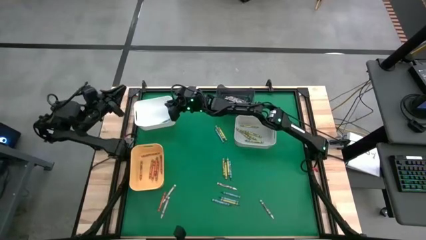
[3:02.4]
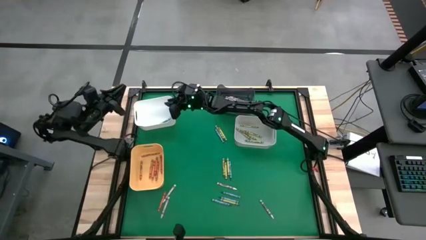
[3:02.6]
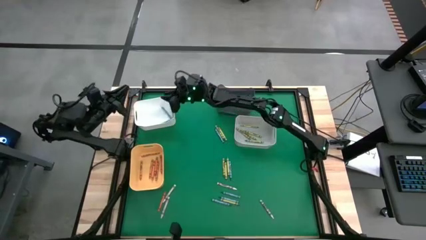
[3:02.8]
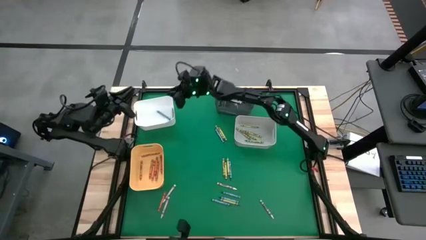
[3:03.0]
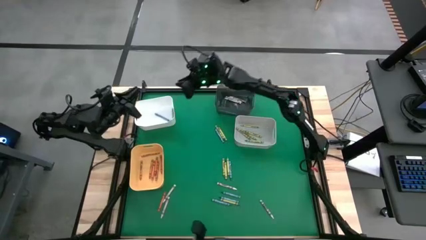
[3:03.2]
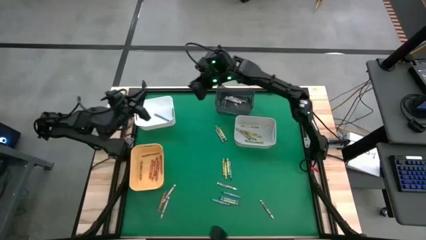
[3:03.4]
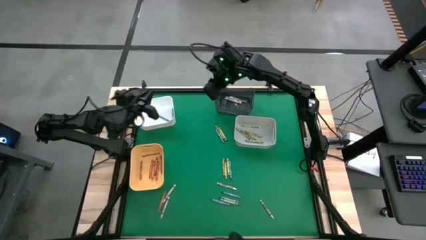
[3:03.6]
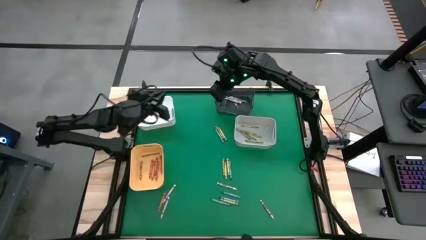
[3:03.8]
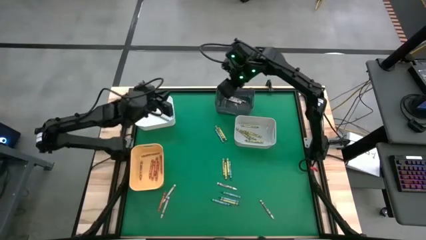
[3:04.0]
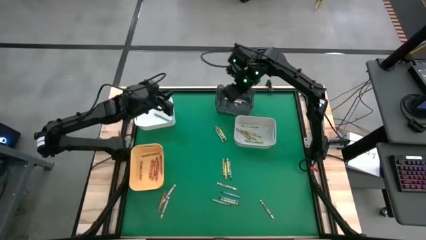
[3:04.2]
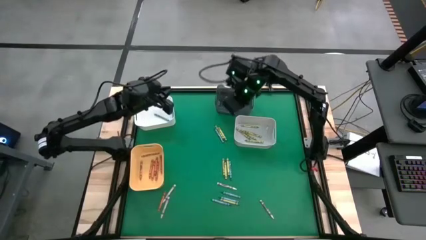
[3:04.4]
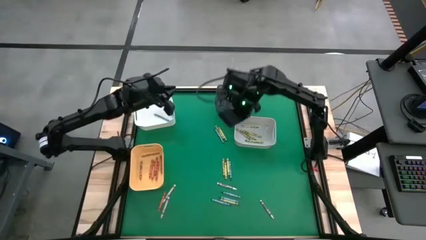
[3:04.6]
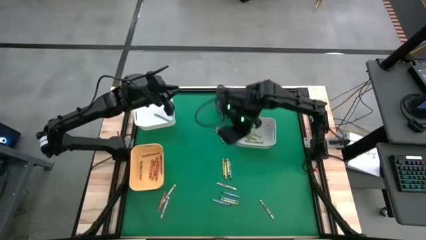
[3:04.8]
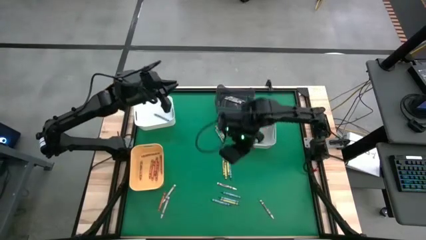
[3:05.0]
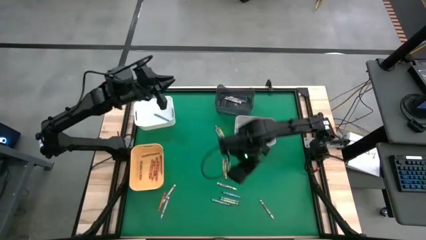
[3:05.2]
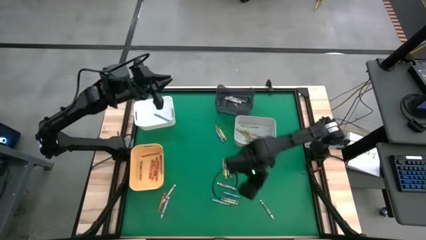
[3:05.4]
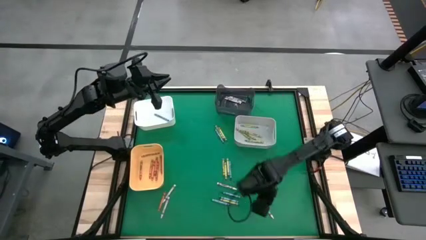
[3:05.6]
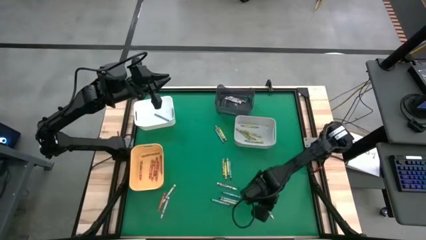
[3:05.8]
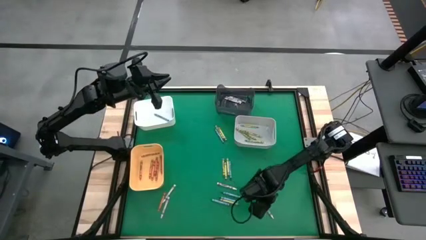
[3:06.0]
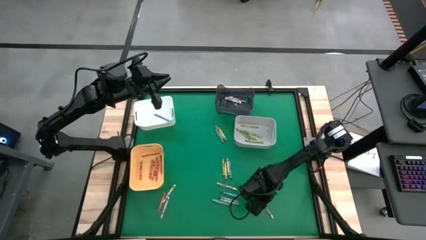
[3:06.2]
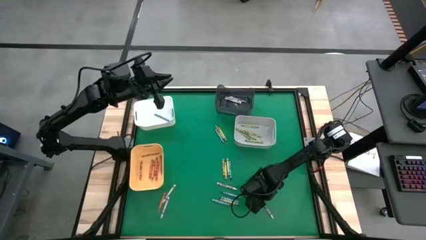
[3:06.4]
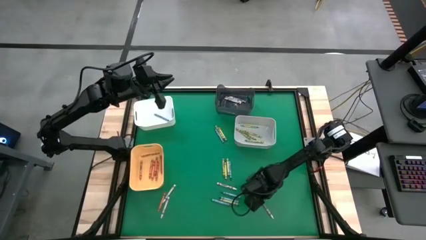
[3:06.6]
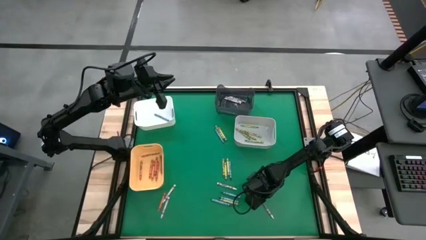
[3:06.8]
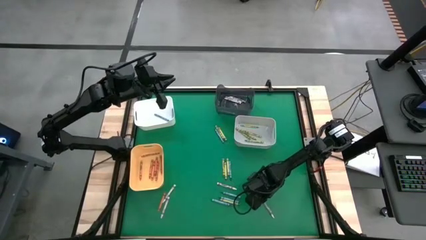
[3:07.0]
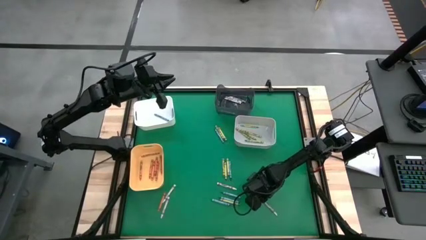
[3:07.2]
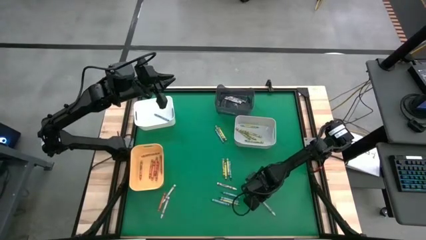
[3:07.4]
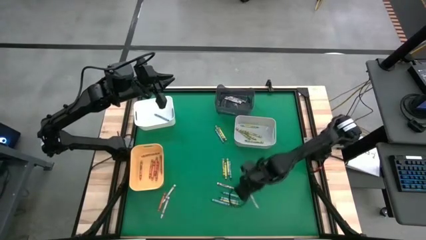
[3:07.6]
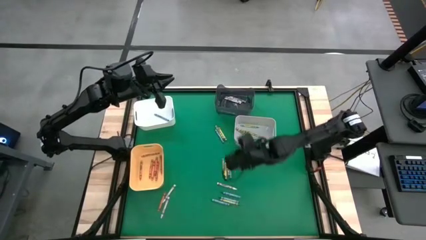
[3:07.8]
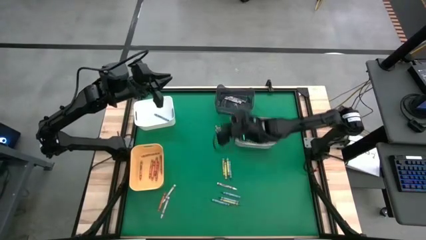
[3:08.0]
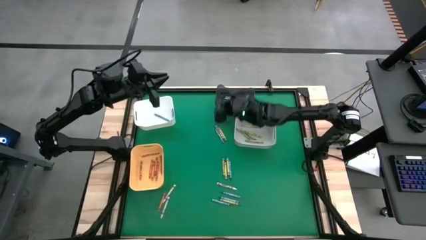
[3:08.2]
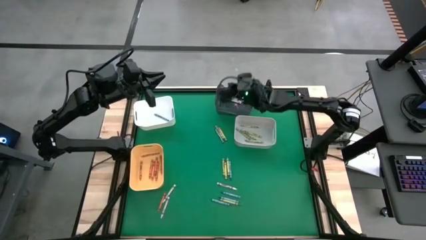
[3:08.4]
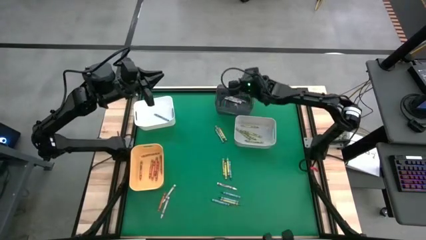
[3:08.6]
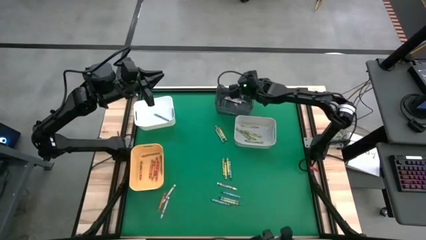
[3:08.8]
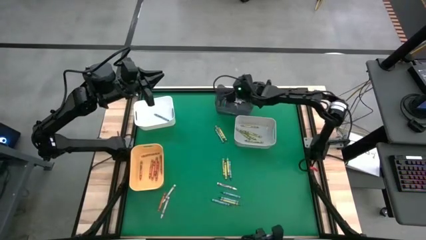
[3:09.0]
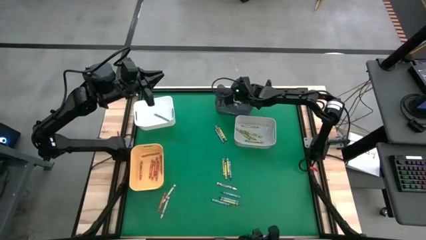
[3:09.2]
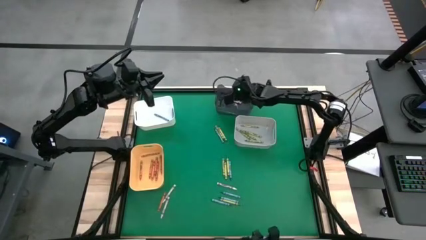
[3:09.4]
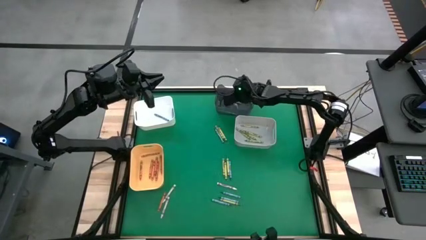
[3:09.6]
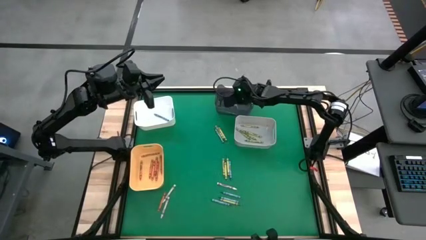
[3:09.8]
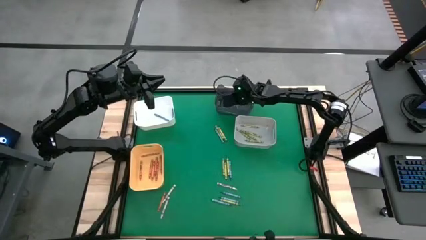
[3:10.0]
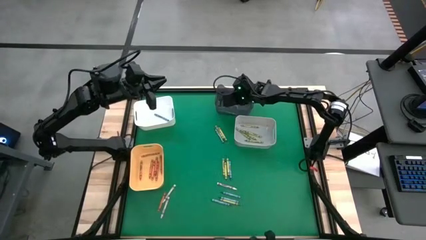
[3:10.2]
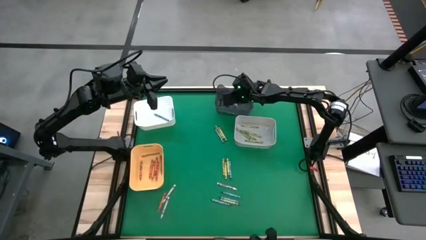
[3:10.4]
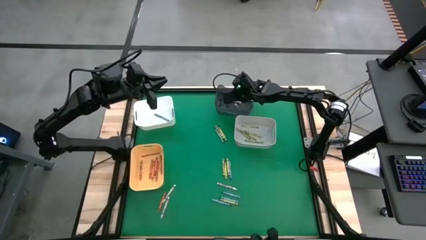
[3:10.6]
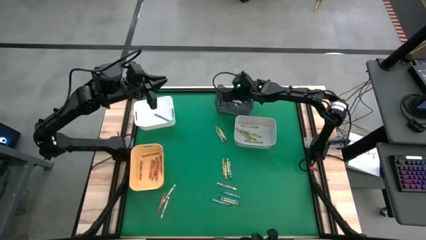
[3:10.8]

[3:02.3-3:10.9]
Task: Sort crayons
Put the white crayon into the black bin

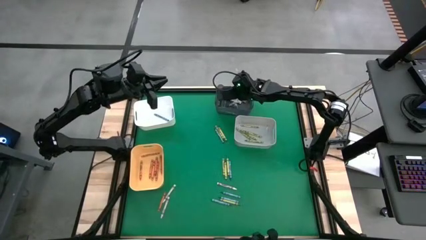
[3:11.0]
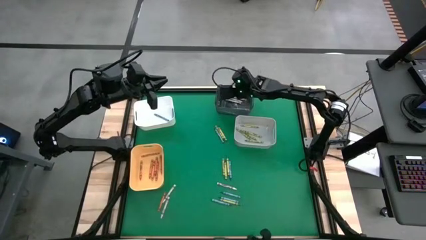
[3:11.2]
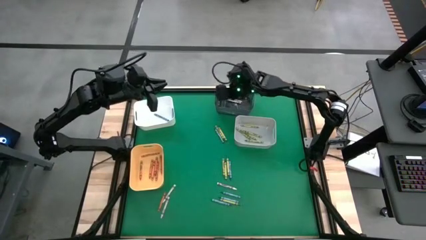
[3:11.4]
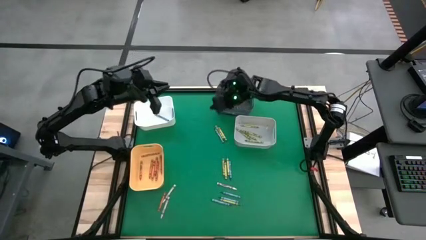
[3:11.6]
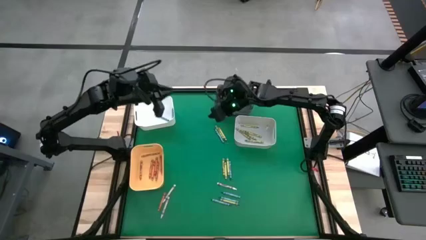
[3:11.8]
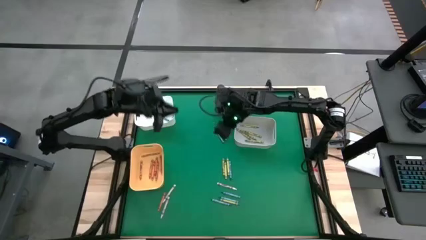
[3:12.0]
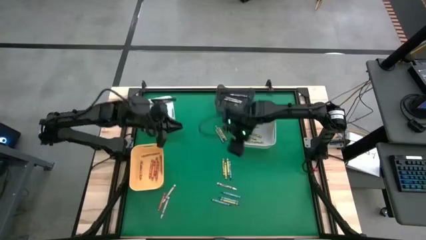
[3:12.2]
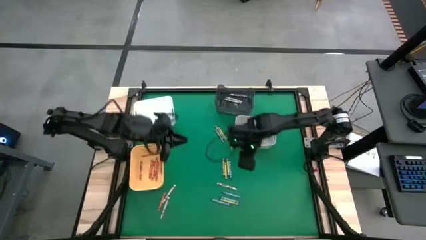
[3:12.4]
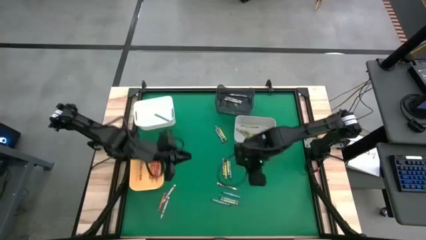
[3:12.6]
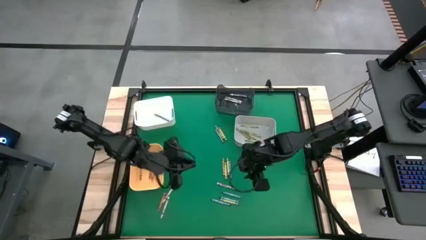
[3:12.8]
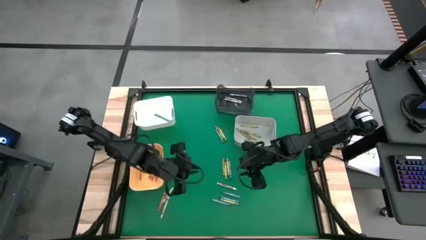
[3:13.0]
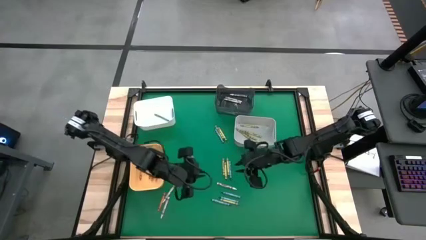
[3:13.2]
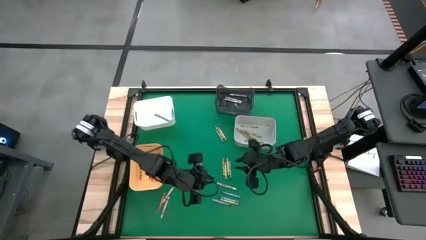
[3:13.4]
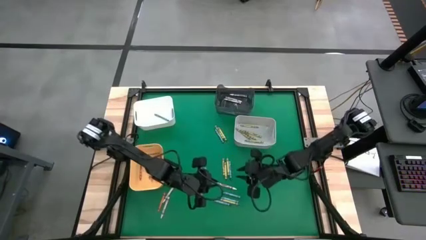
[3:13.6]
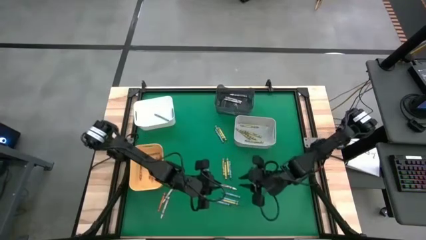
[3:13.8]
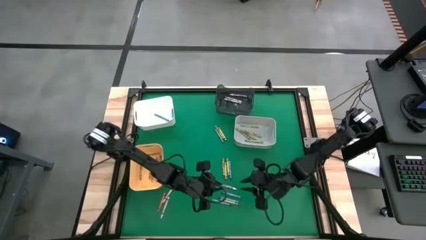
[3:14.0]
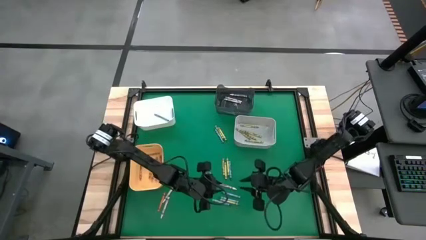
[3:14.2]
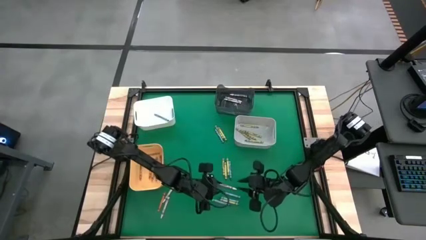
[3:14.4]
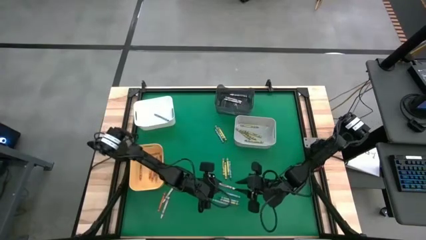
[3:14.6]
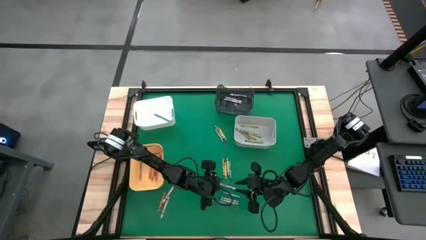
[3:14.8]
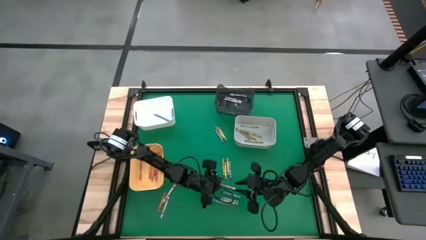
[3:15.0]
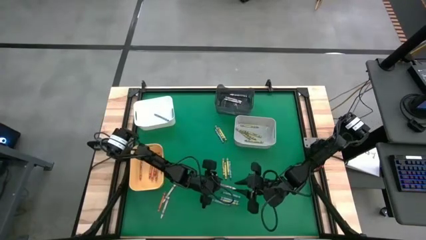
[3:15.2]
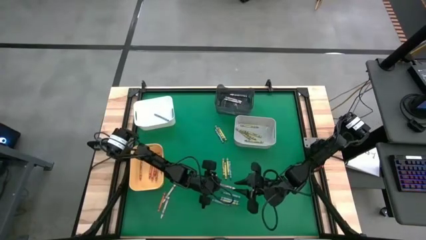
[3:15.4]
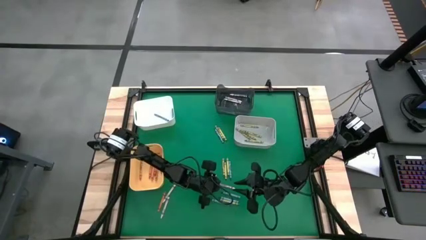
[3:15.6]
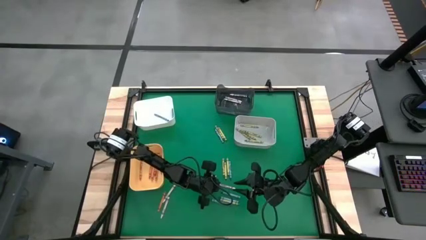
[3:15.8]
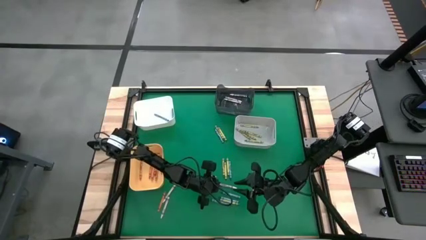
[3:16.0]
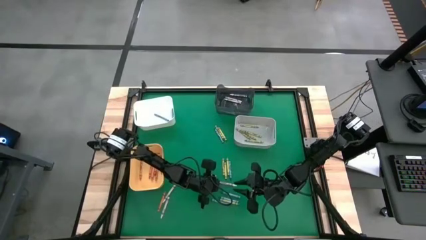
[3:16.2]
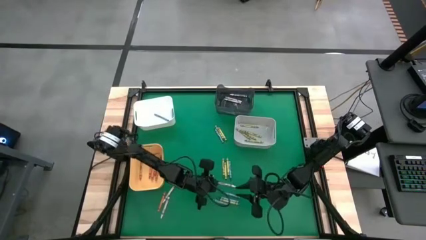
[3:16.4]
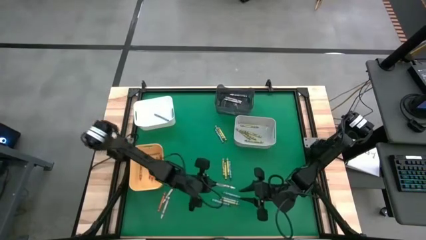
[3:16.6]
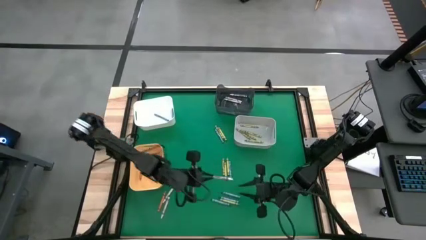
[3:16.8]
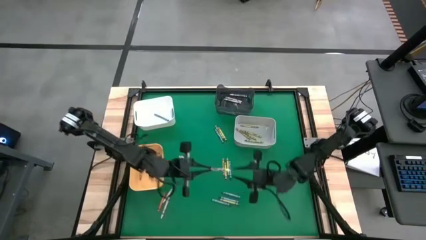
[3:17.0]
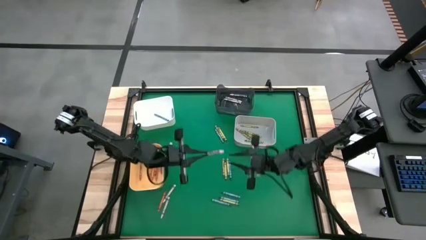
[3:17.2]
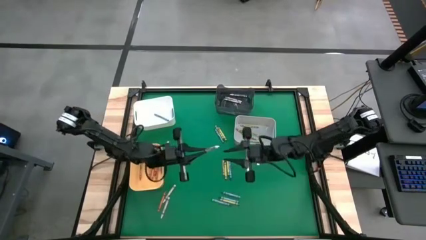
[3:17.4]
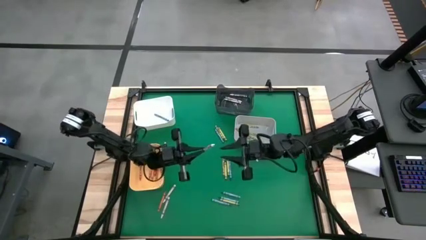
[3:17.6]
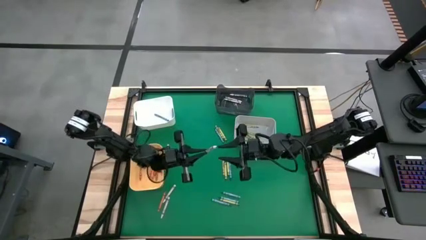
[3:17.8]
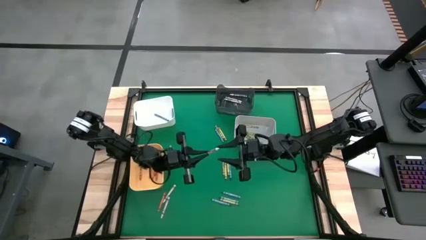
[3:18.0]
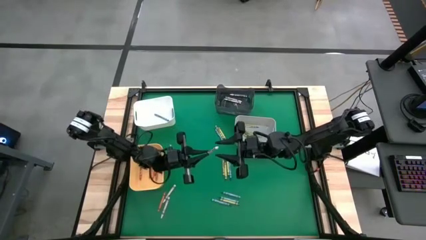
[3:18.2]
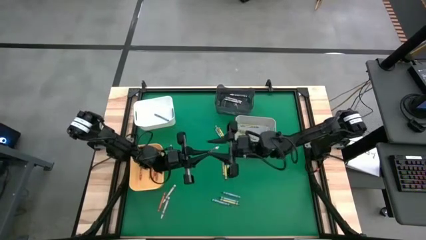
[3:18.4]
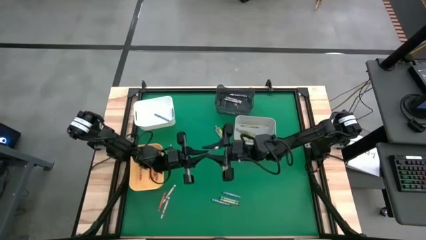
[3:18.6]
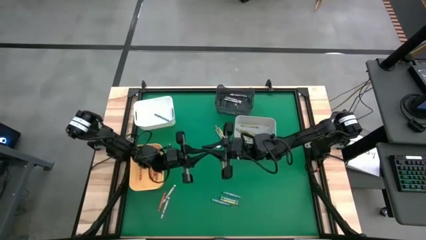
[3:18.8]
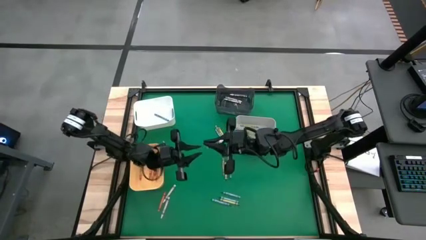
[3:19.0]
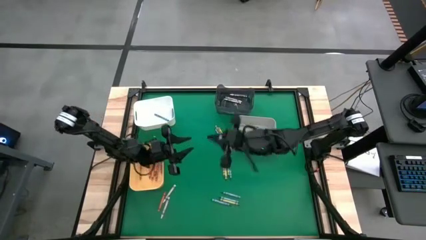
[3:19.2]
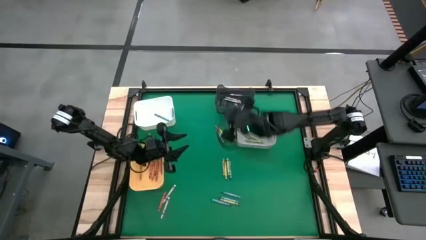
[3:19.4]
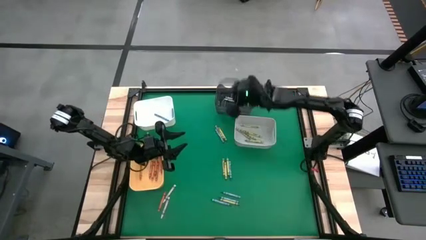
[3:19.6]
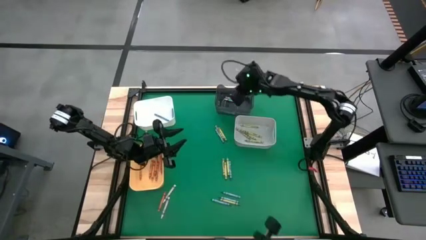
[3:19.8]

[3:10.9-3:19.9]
Put the white crayon into the black bin
